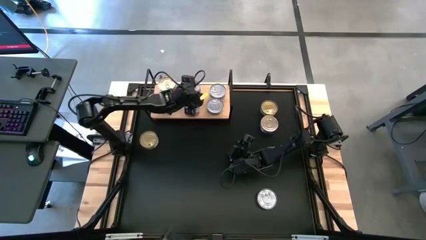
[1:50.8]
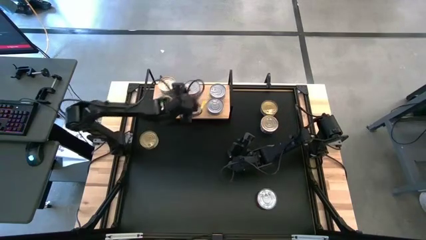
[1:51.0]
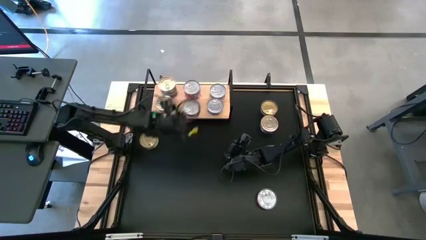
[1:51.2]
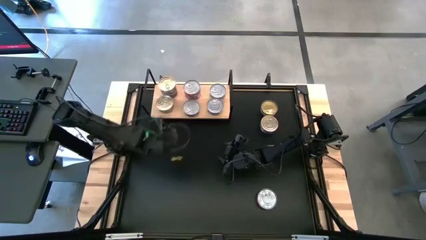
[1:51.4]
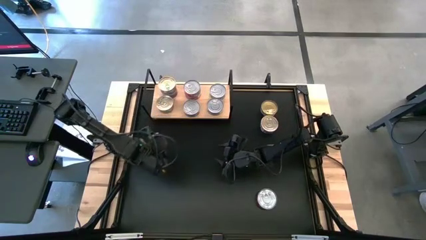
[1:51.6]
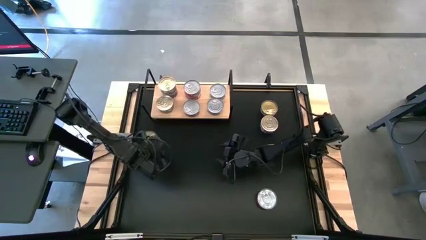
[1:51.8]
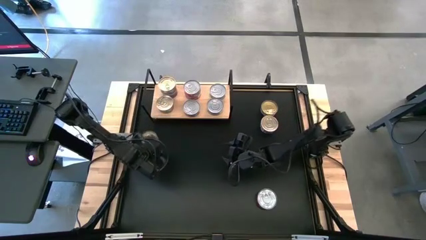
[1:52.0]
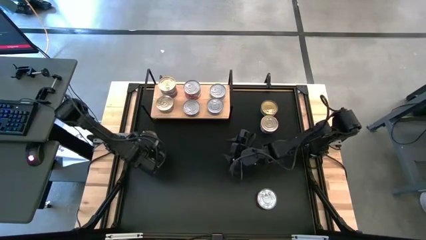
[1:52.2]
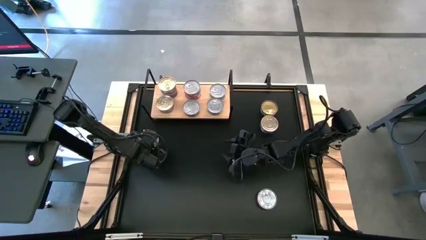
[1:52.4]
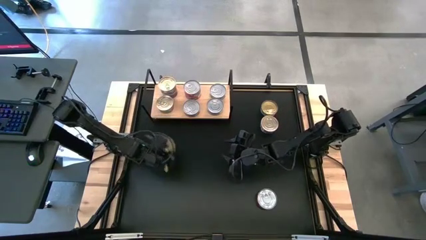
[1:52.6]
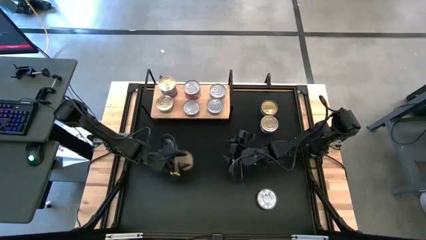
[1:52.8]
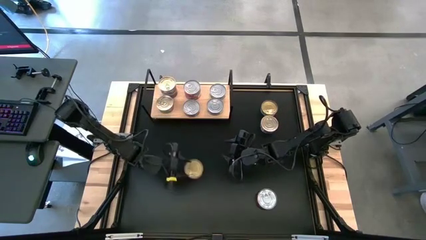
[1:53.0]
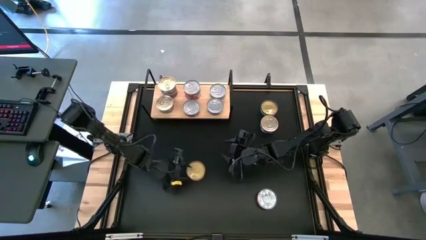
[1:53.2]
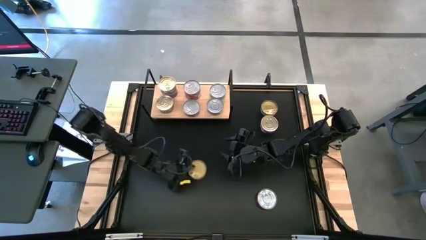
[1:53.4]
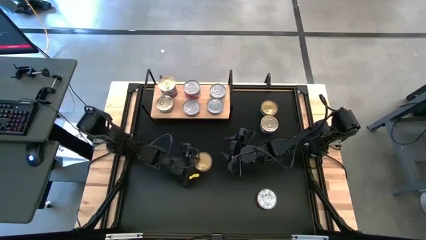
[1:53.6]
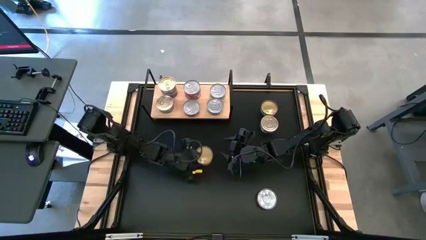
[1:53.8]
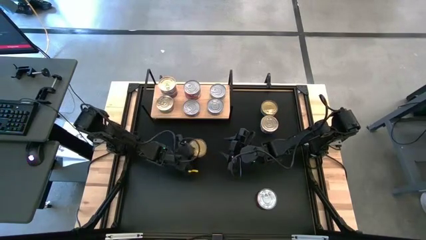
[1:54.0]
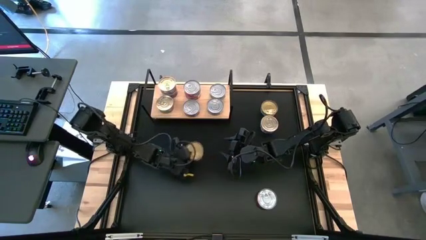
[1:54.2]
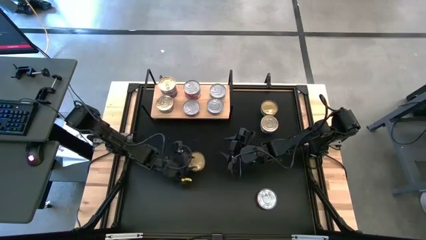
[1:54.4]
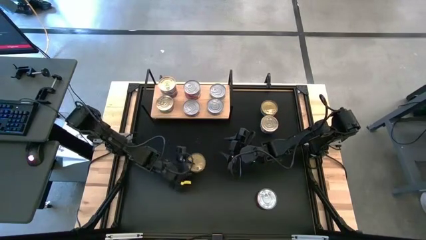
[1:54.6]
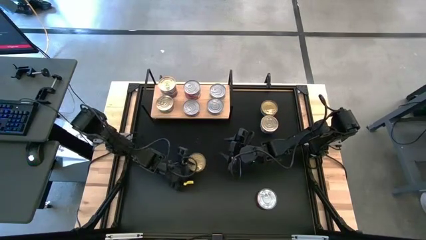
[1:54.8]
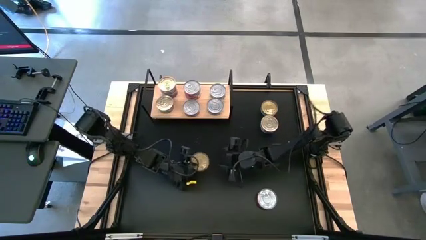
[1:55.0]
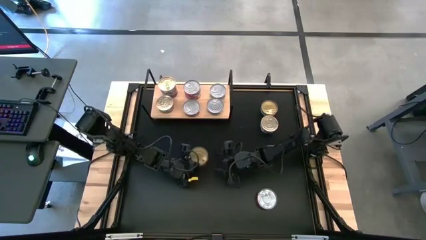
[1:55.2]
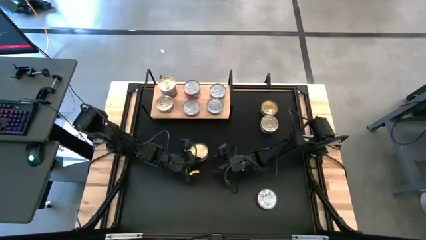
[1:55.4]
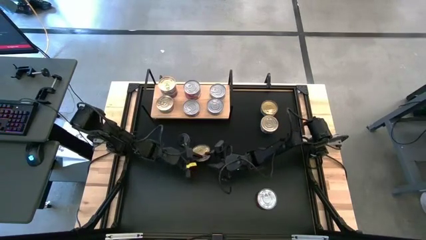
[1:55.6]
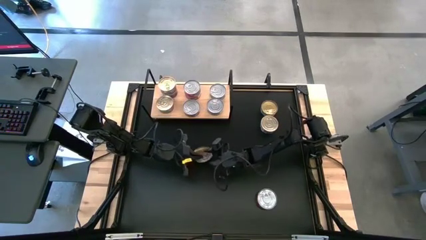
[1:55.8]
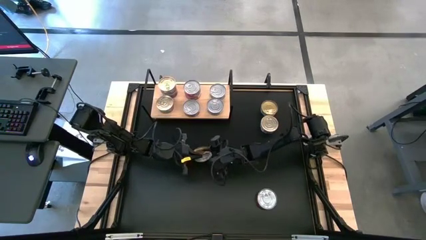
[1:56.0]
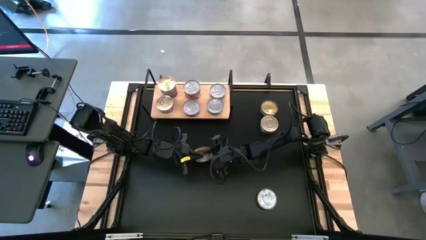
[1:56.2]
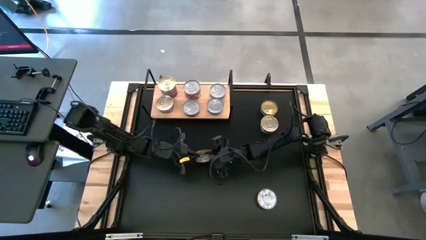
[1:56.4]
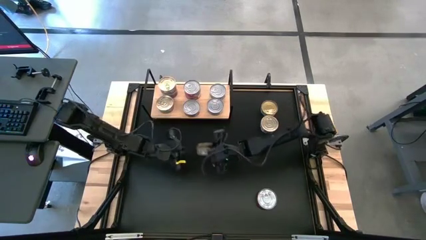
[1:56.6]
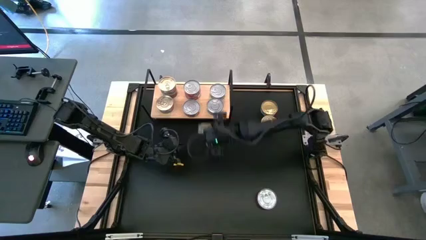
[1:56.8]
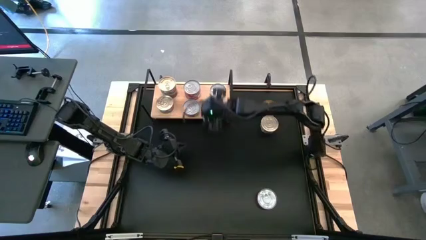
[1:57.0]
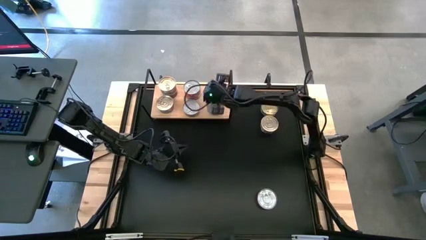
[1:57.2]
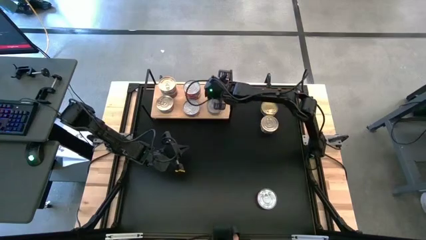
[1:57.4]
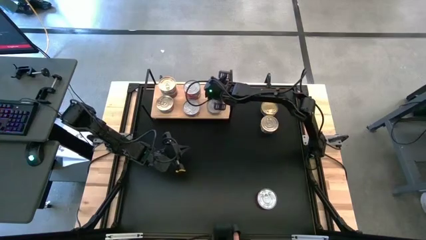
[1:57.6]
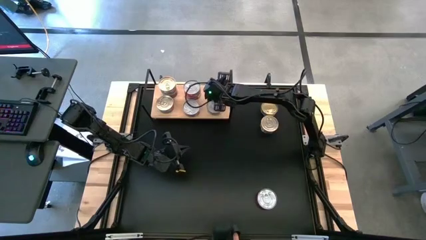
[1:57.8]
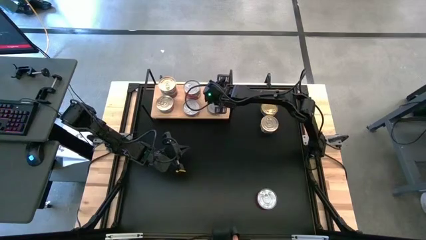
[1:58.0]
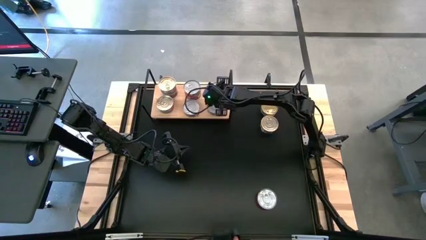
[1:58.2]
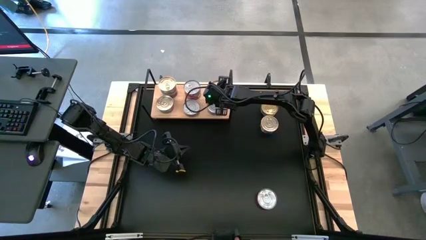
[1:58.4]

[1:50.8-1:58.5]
Task: Stack canned seafood by type on shelf
Stack the left green tuna can on top of the green tuna can on the shelf

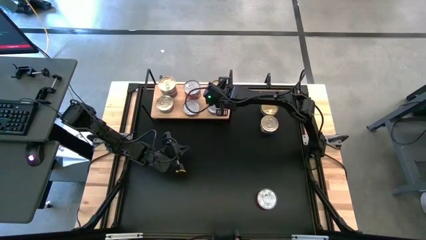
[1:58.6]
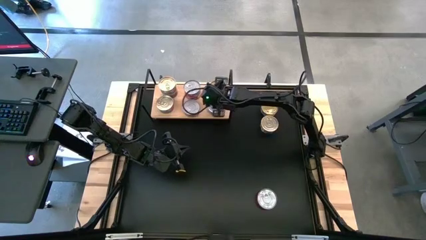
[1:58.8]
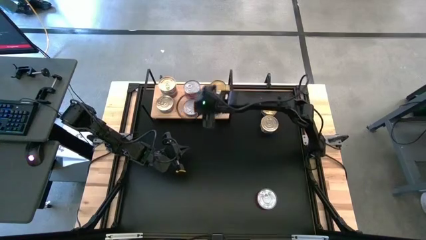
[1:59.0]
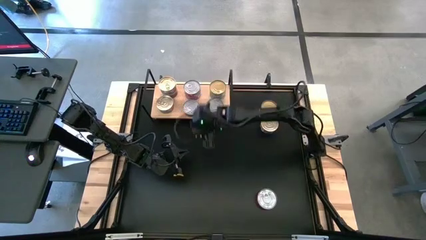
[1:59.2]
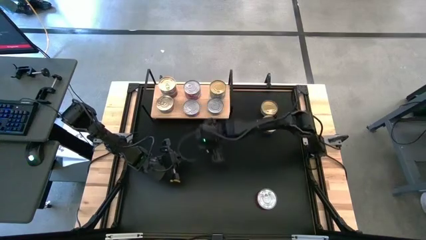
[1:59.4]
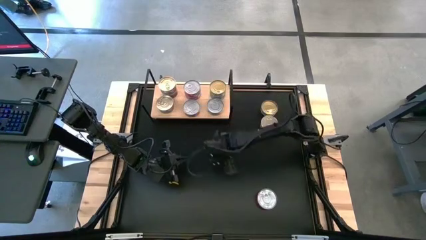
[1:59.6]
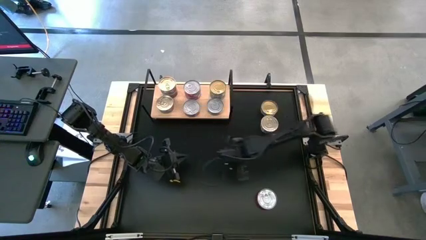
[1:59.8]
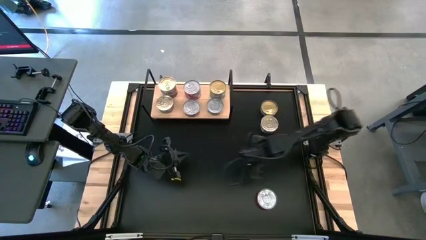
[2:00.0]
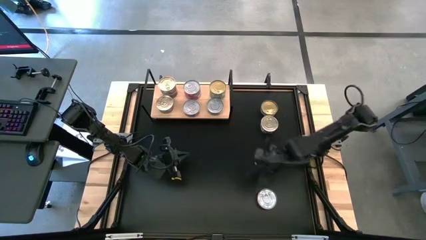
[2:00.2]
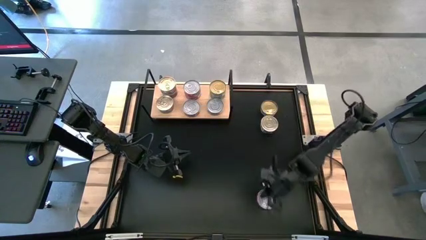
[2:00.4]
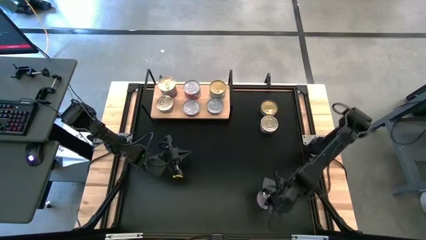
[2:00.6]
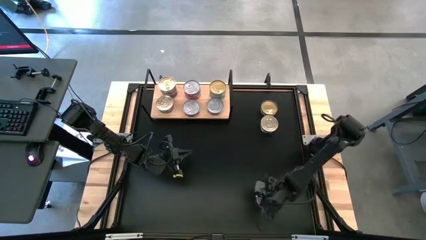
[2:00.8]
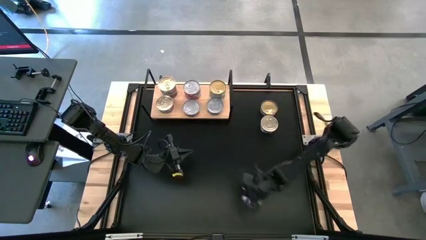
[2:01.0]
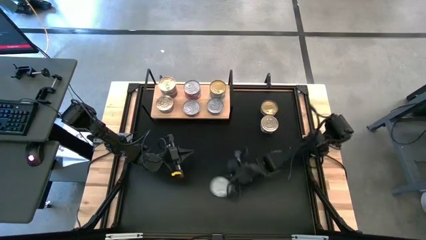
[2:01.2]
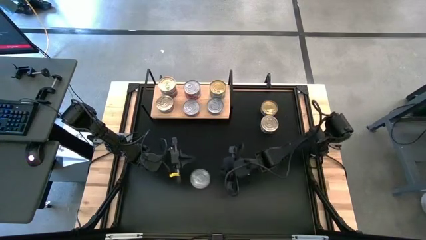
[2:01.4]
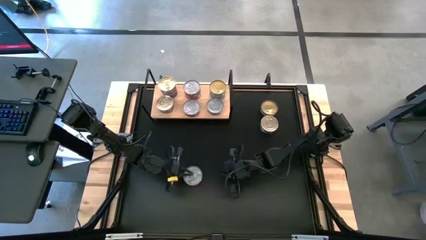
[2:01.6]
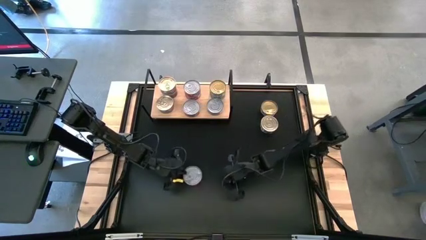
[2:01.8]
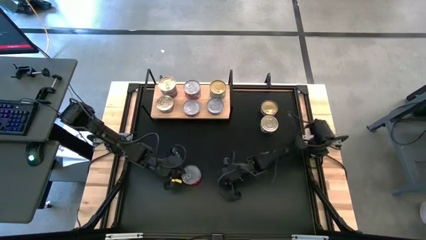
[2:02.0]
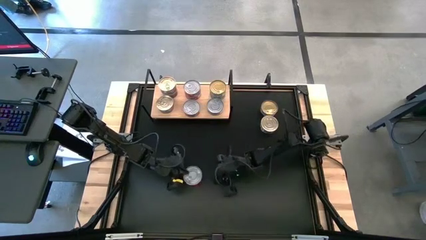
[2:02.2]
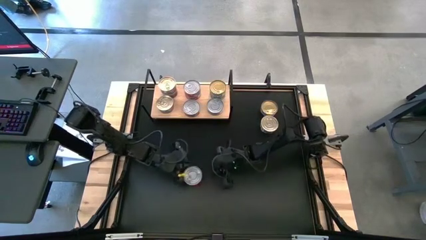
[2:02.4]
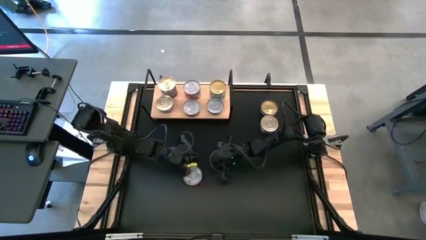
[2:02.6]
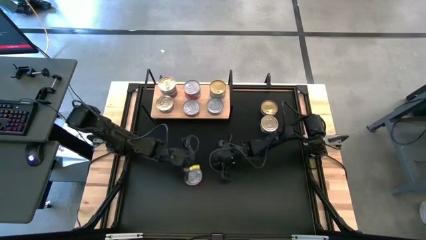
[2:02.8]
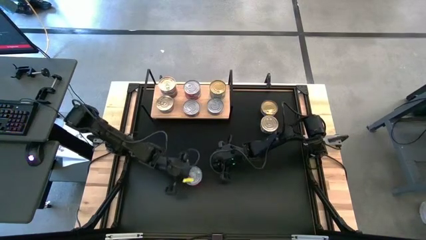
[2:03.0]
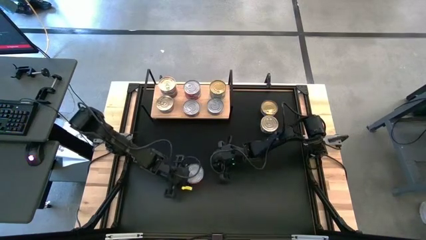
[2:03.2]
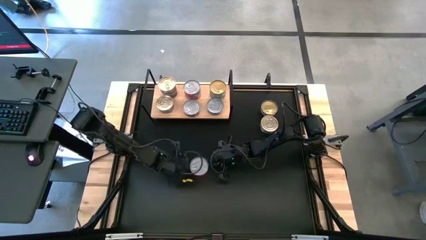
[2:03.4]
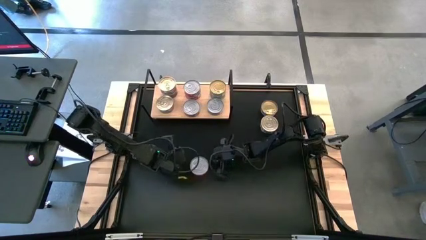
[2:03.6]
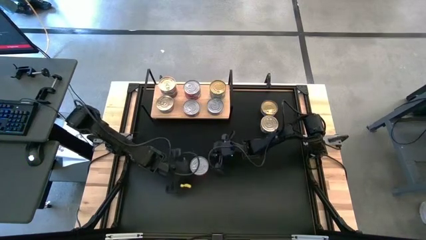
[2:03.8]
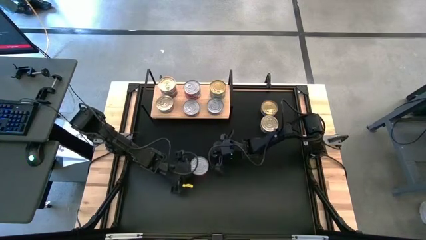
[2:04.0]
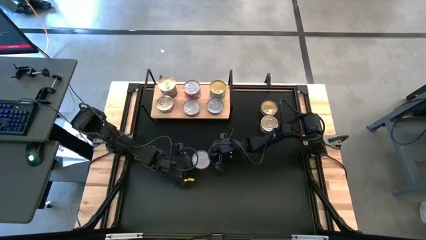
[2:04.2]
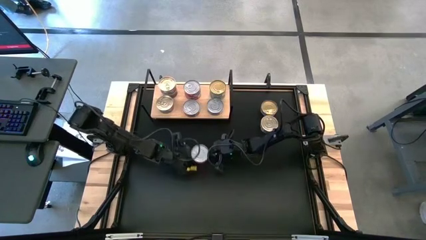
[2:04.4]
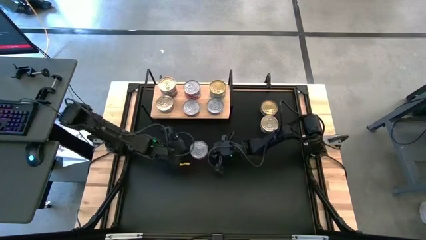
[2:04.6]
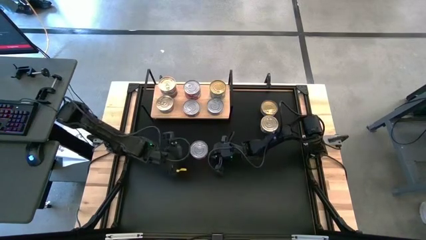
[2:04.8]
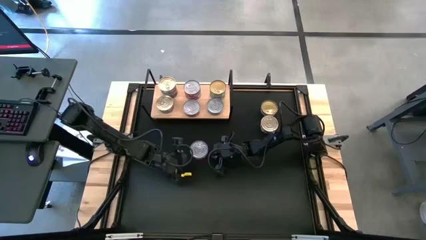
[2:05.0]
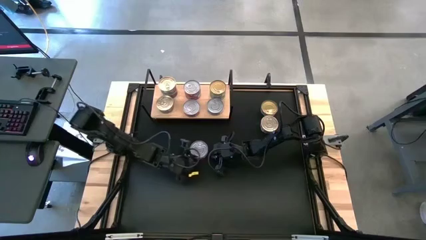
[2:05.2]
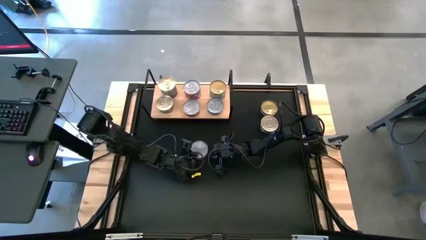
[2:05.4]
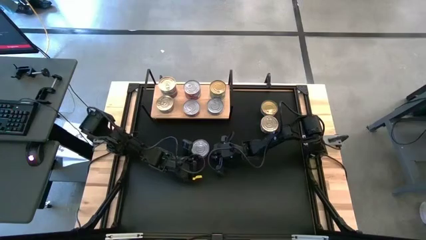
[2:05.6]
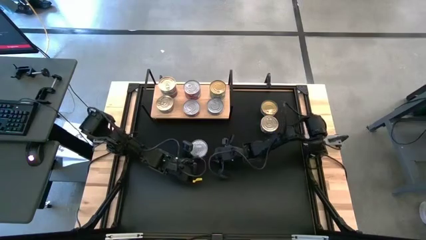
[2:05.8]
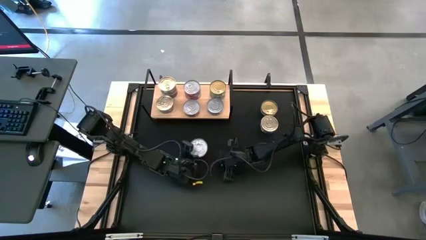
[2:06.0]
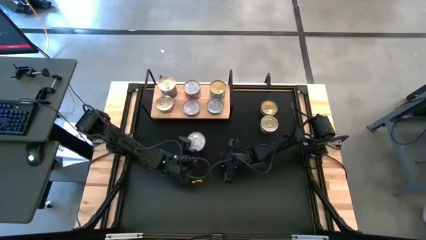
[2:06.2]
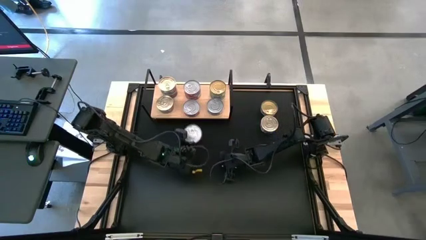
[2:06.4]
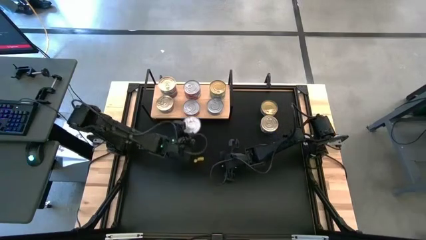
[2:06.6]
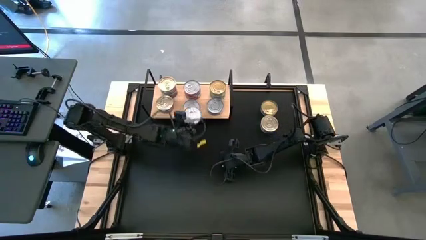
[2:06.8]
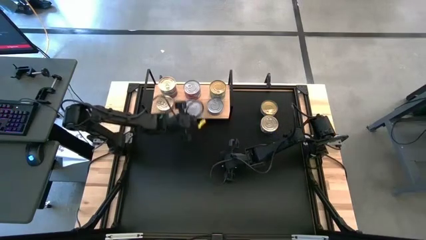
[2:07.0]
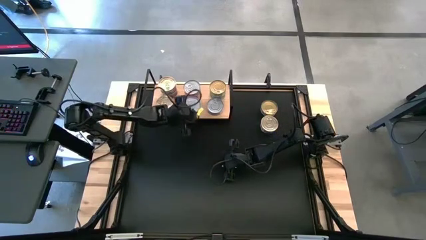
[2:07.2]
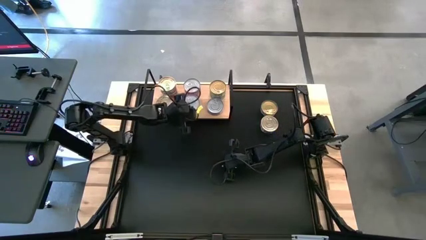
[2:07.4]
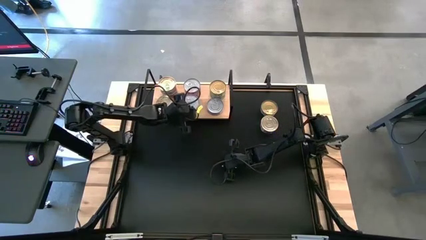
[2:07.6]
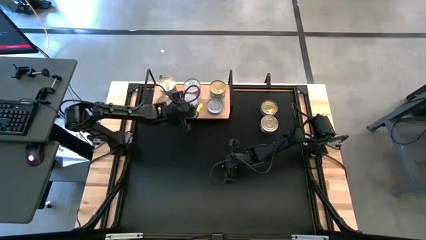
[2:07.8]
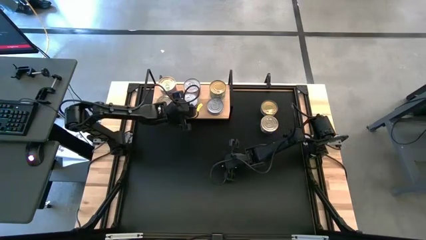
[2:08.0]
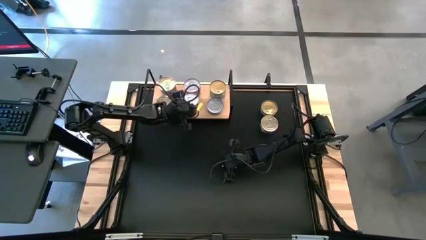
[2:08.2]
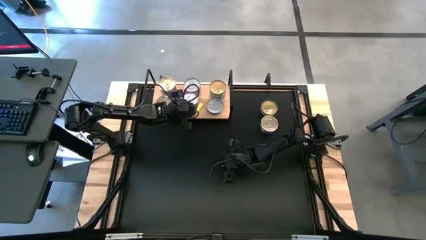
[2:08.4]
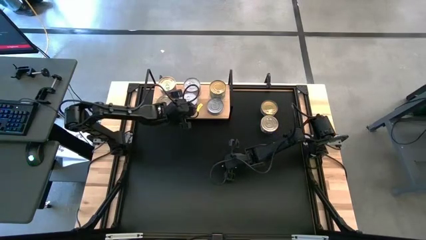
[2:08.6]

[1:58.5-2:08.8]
Stack the red tuna can on top of the red tuna can on the shelf
